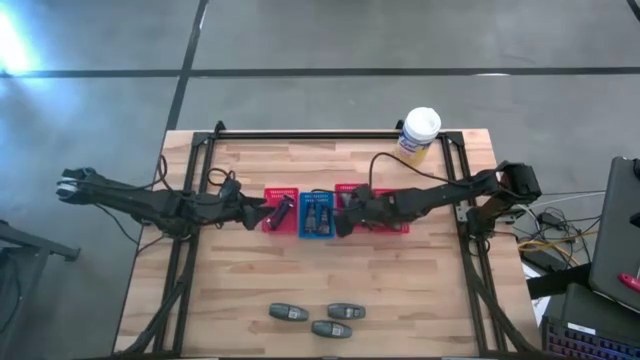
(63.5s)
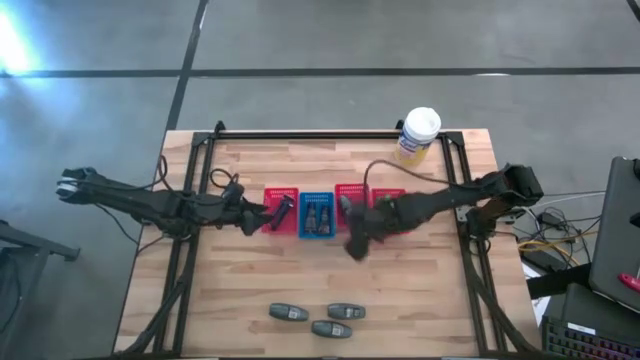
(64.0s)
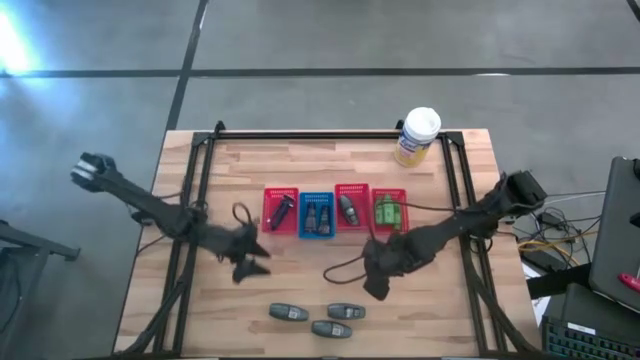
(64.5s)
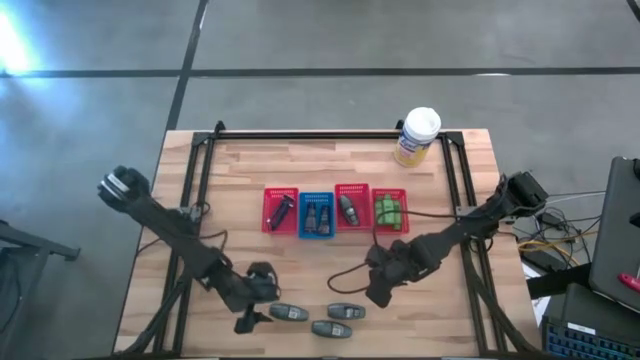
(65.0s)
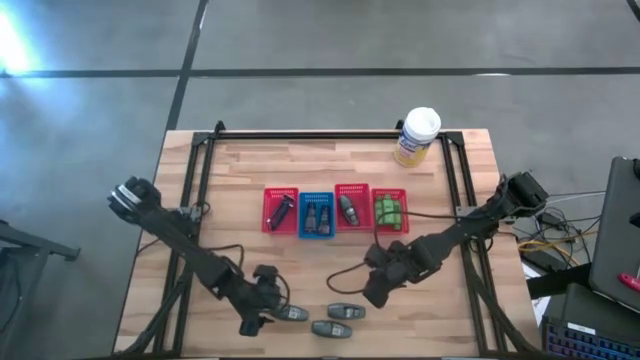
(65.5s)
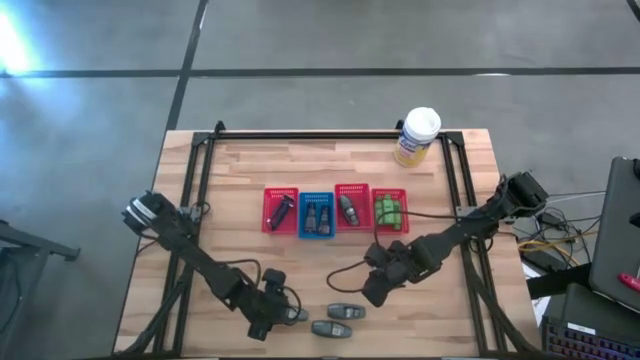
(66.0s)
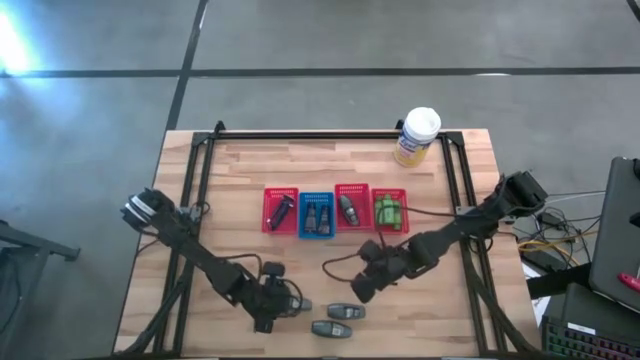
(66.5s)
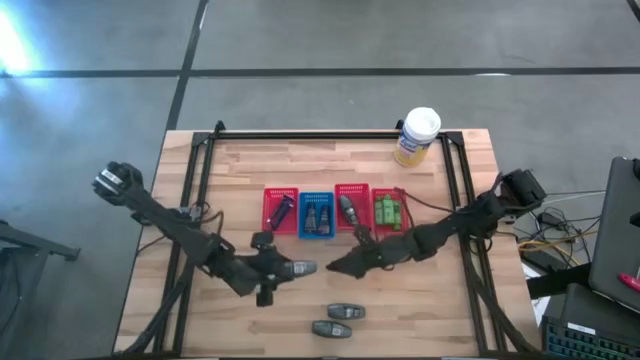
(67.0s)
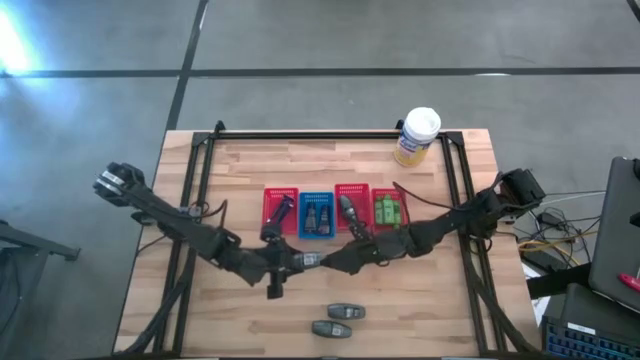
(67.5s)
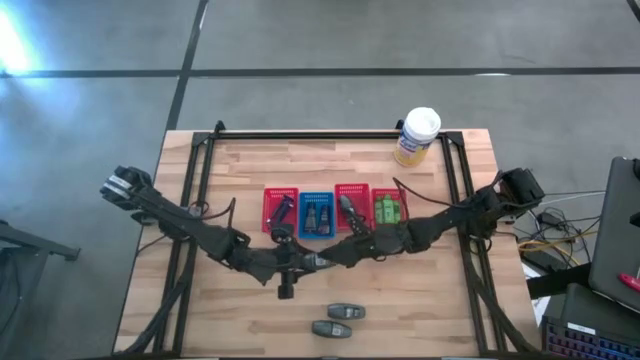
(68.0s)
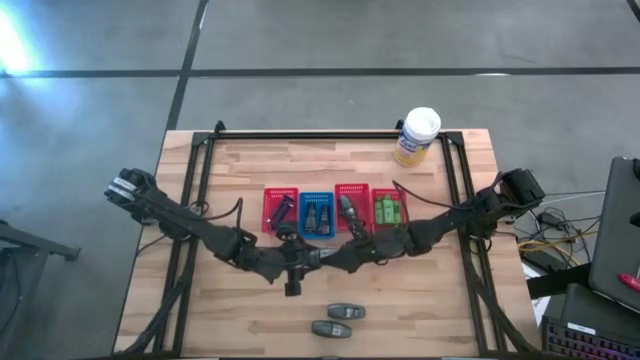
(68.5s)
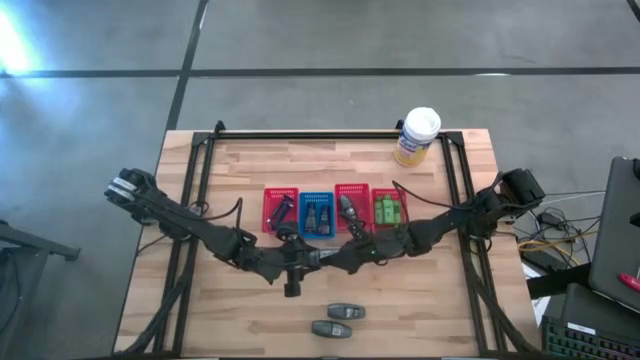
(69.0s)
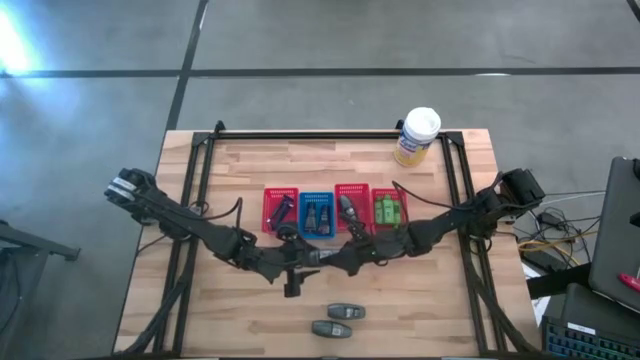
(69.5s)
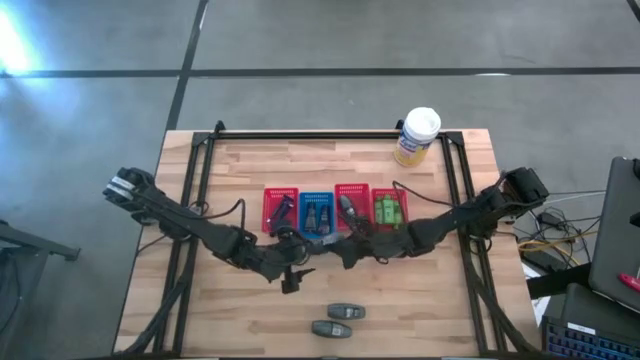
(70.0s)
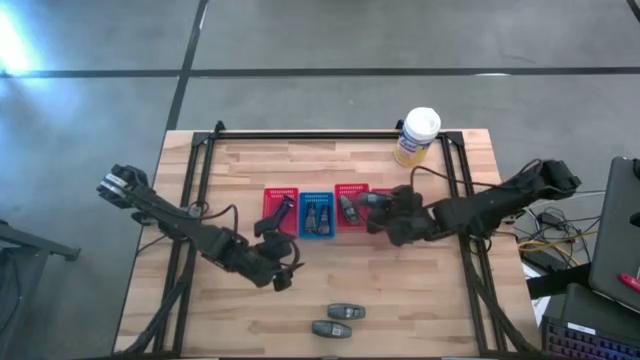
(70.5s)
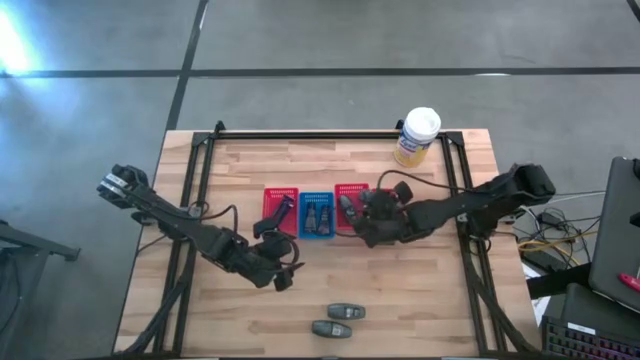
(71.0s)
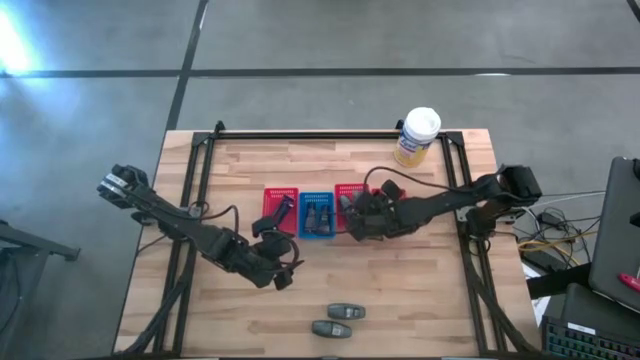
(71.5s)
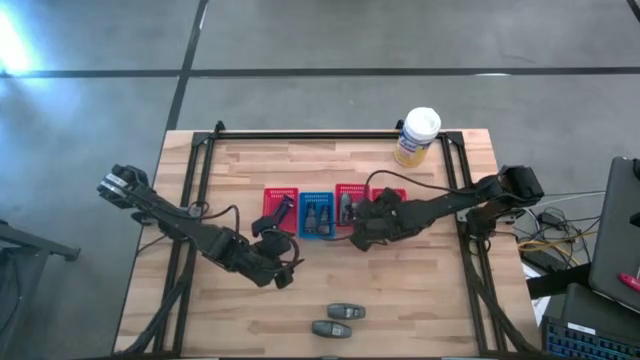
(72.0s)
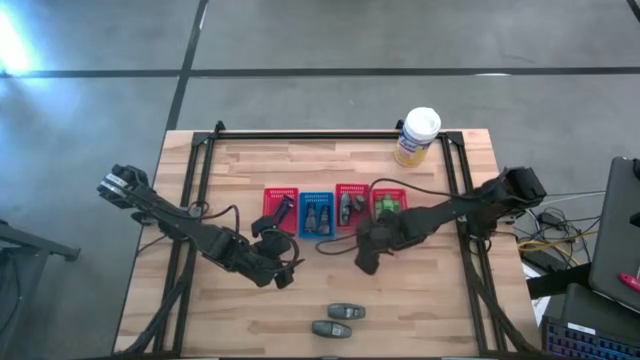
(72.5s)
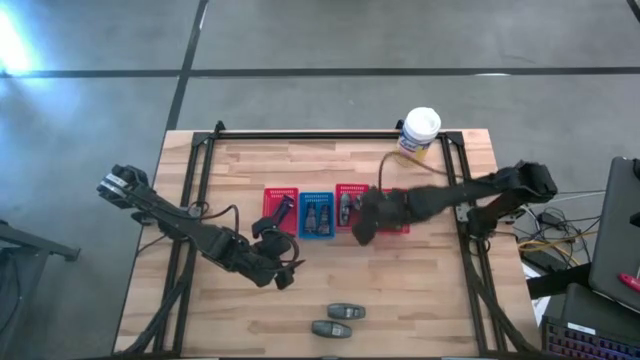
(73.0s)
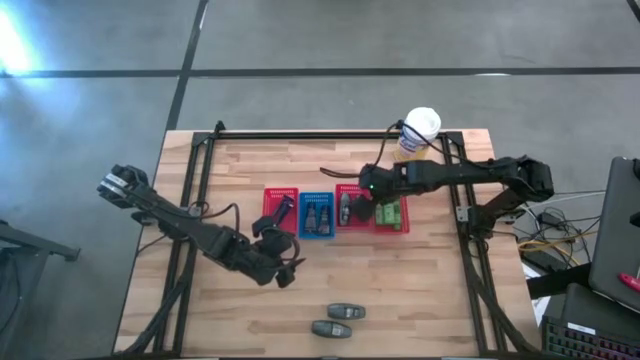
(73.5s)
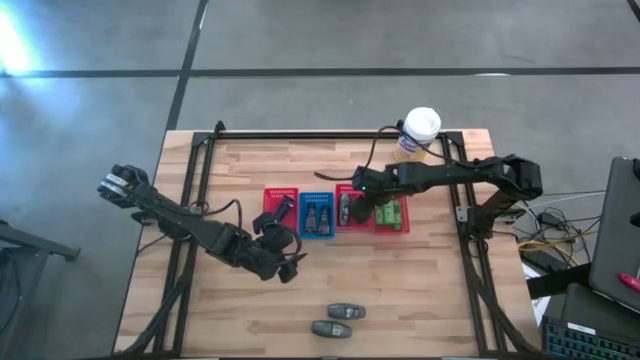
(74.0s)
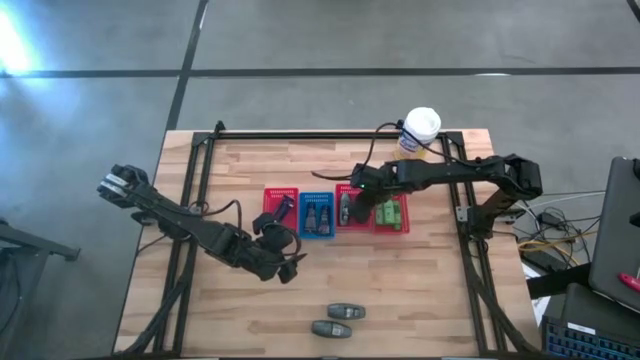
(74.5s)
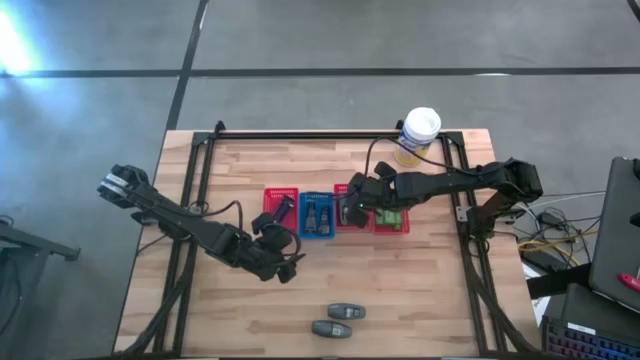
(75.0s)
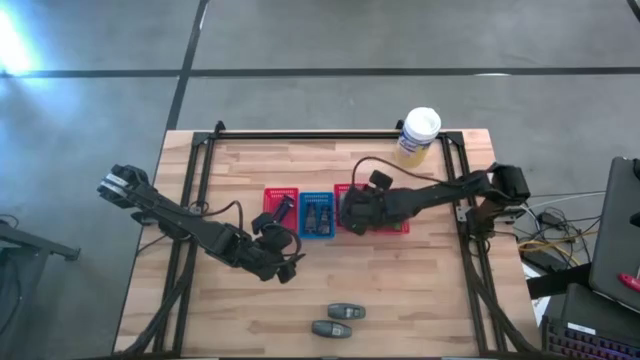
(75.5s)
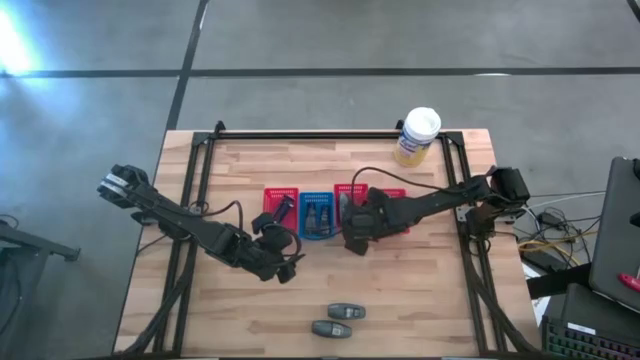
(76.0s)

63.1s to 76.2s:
Task: Pick & Place Travel size toiletries
Put the gray deodorant into the middle red bin

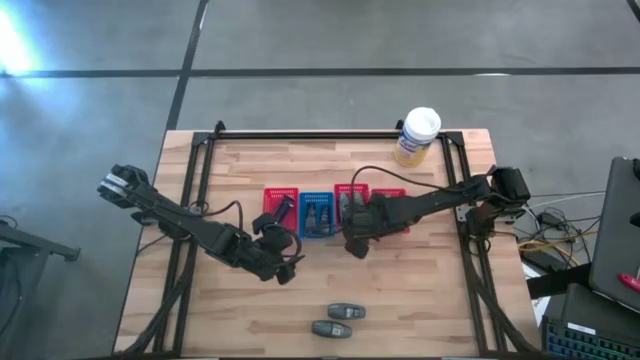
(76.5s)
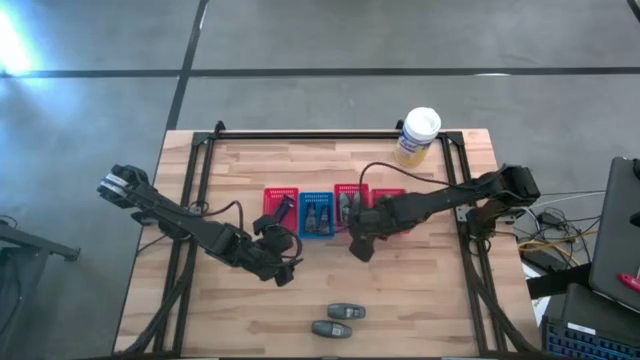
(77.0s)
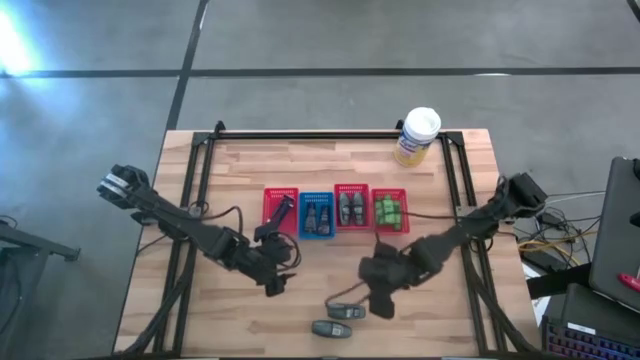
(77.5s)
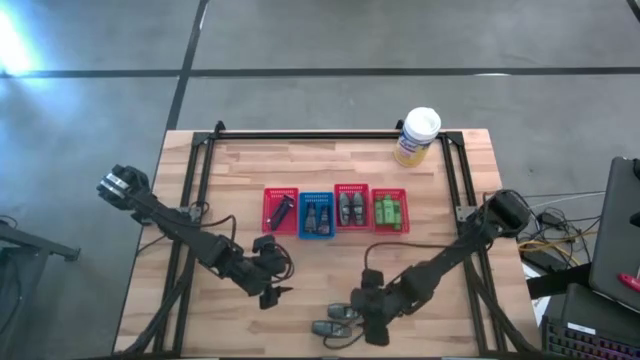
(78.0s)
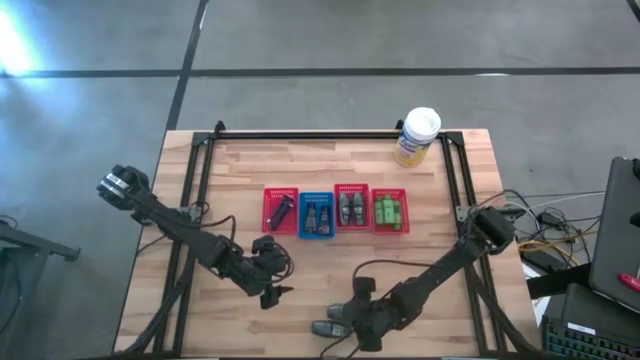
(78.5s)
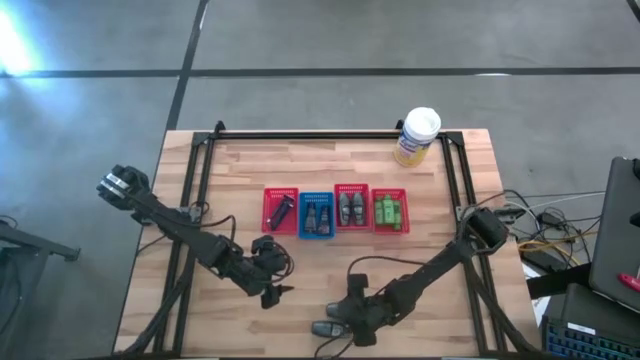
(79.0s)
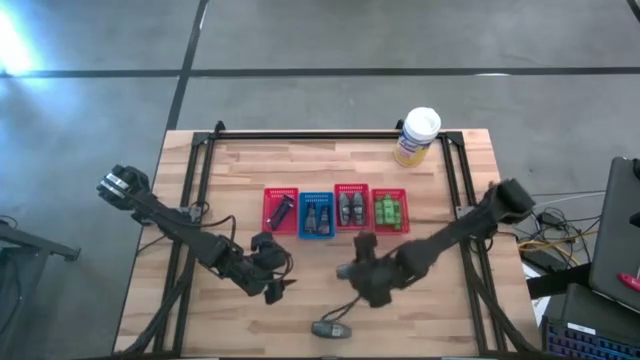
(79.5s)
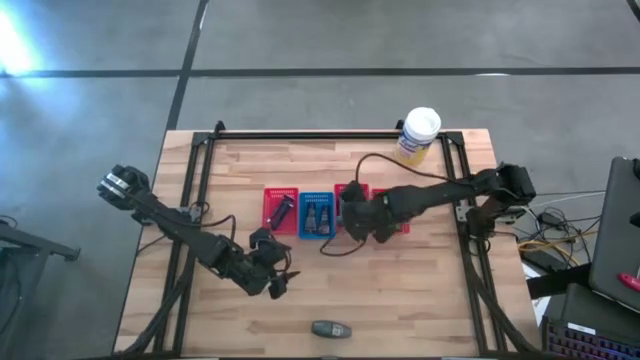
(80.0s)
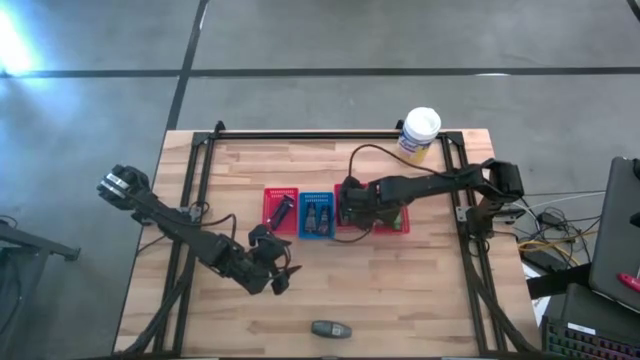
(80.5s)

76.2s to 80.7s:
Put the gray deodorant into the middle red bin

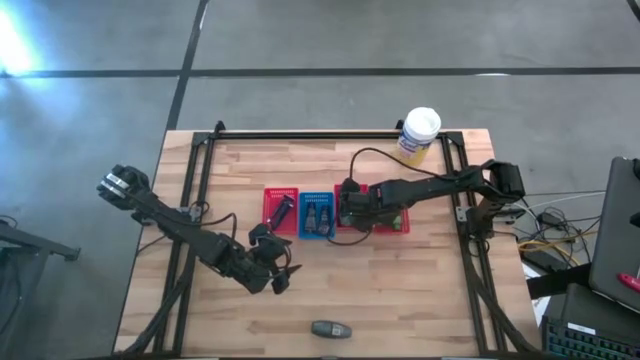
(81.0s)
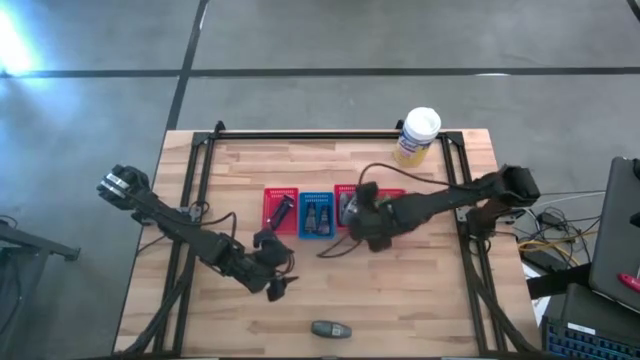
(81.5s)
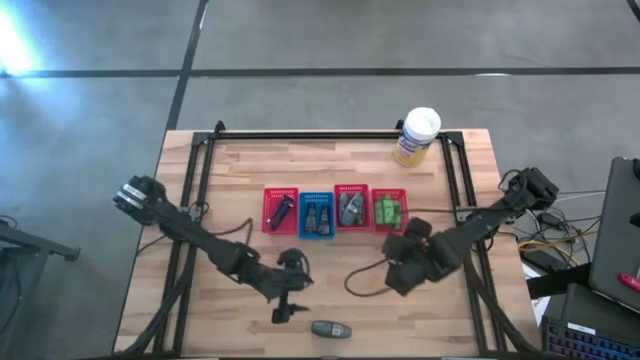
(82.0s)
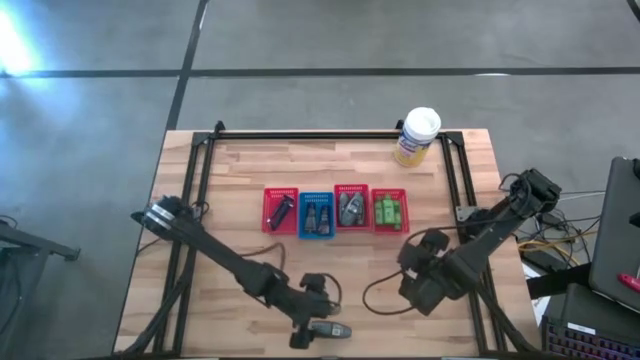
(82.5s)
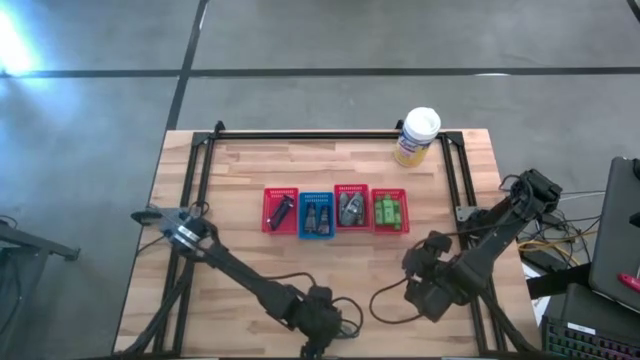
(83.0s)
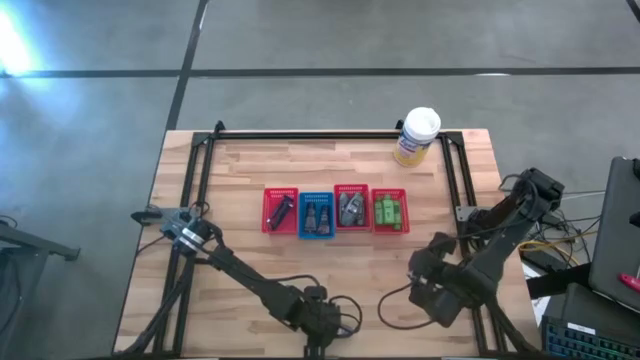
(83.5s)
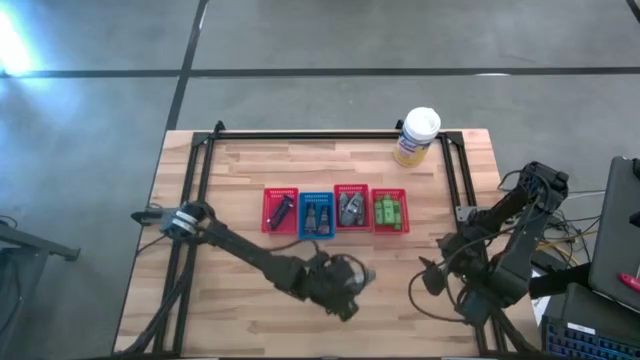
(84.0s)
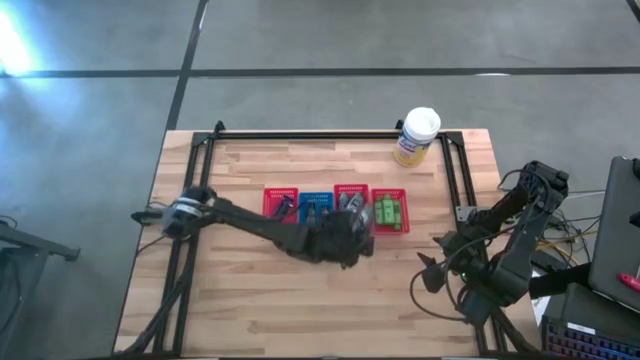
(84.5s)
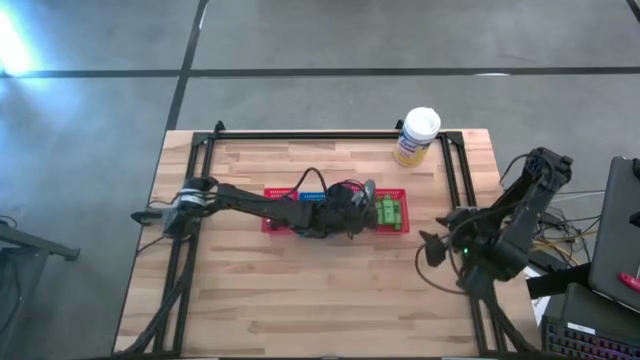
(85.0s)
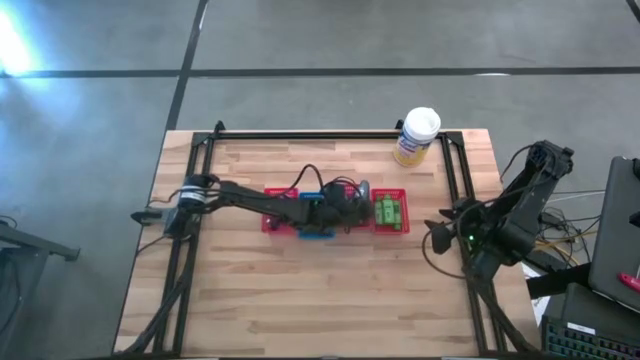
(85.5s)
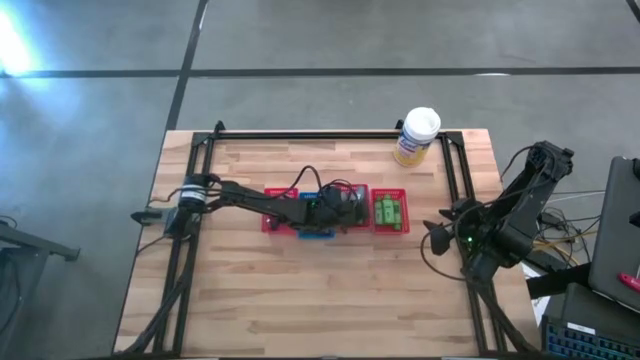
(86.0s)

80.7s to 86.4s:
Put the gray deodorant into the middle red bin
